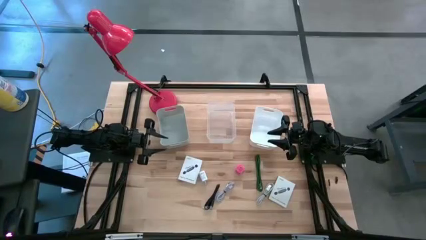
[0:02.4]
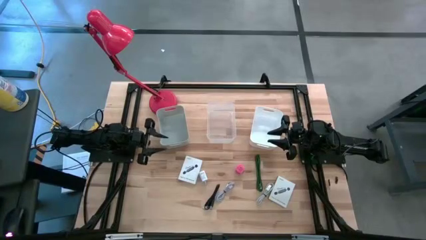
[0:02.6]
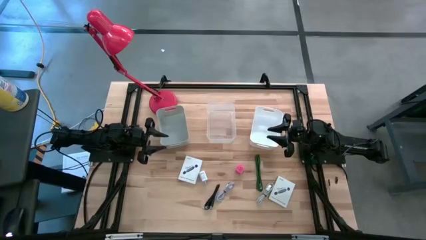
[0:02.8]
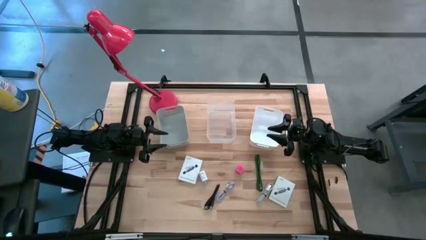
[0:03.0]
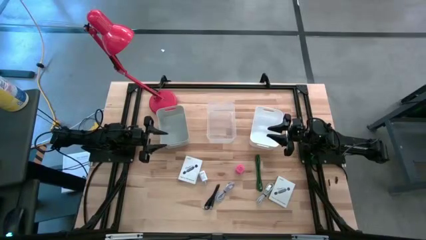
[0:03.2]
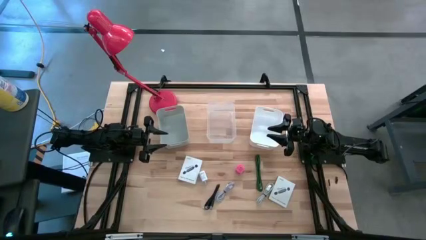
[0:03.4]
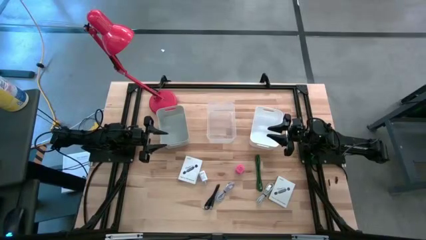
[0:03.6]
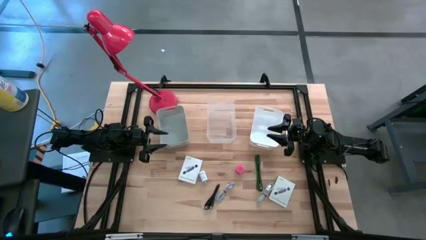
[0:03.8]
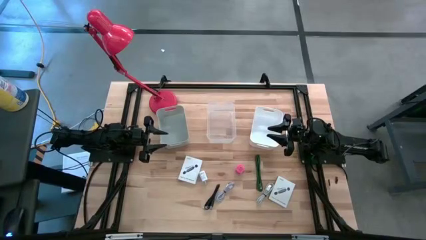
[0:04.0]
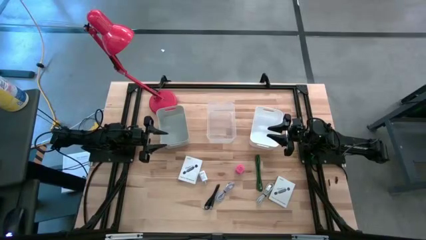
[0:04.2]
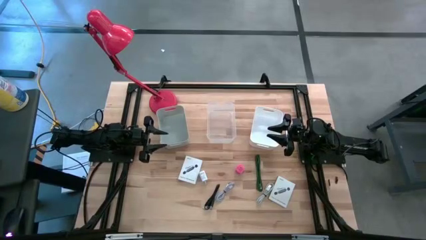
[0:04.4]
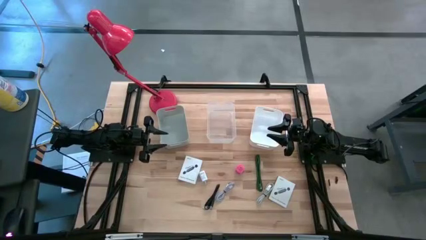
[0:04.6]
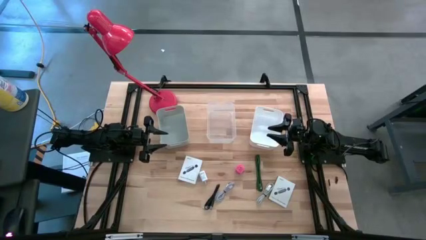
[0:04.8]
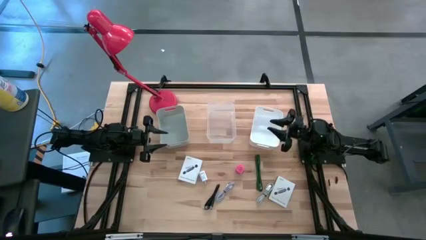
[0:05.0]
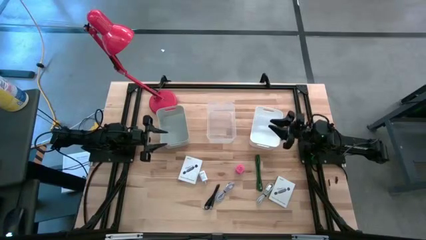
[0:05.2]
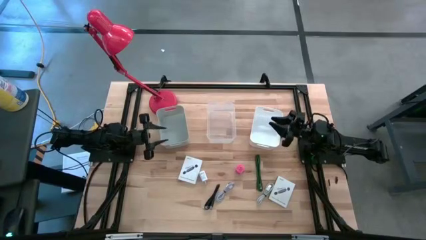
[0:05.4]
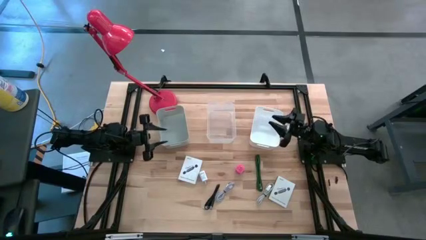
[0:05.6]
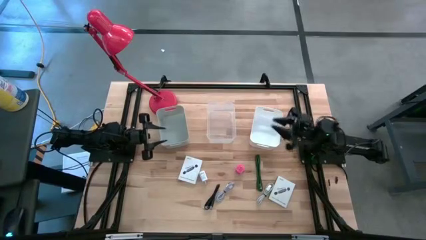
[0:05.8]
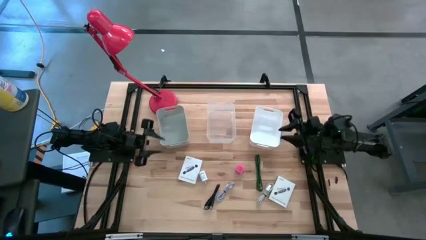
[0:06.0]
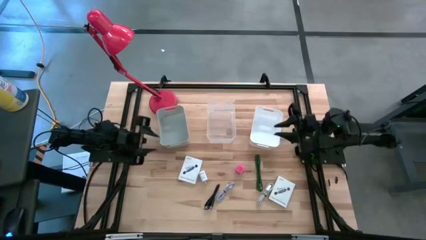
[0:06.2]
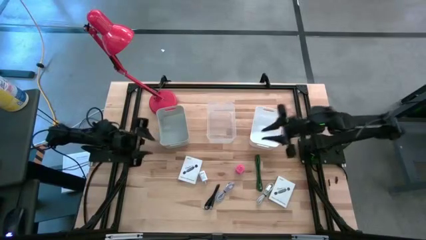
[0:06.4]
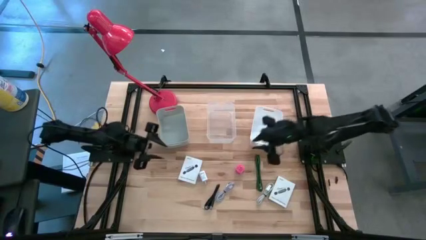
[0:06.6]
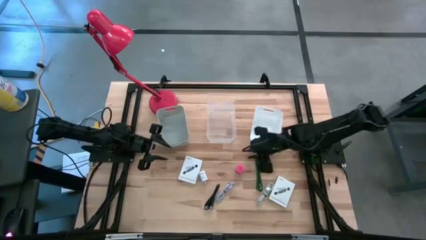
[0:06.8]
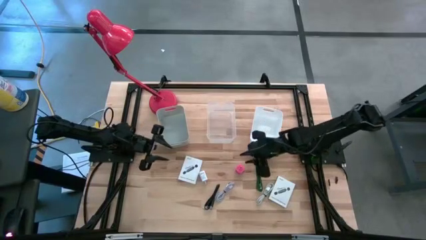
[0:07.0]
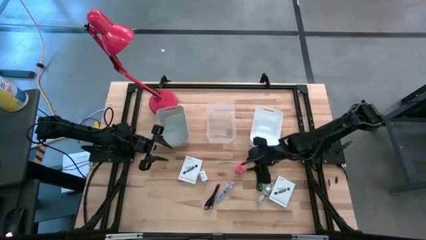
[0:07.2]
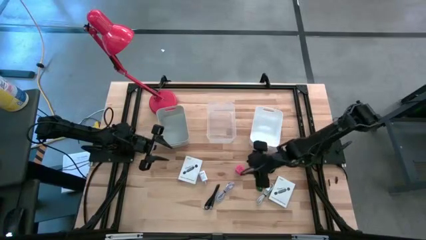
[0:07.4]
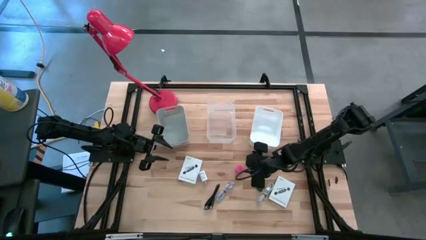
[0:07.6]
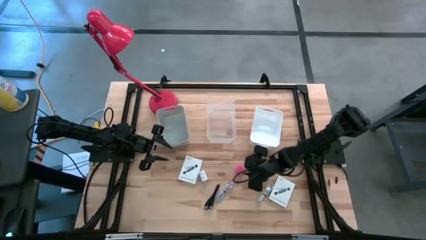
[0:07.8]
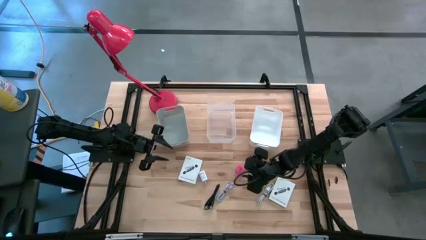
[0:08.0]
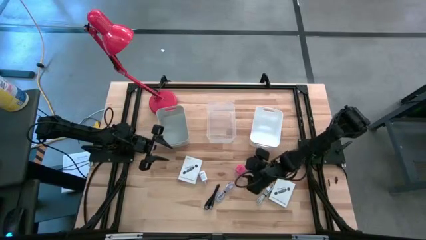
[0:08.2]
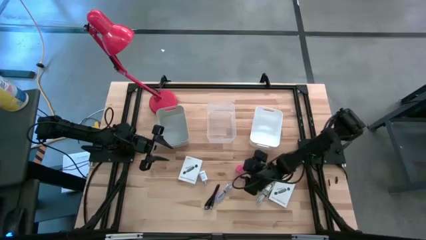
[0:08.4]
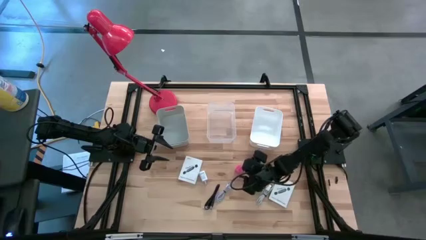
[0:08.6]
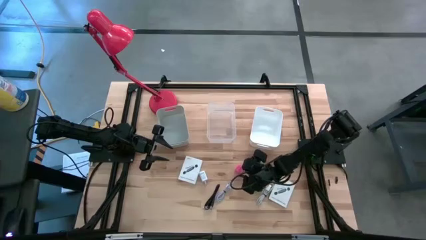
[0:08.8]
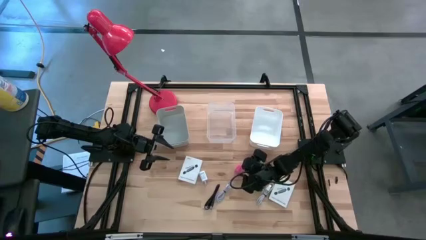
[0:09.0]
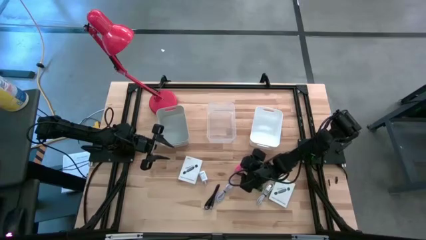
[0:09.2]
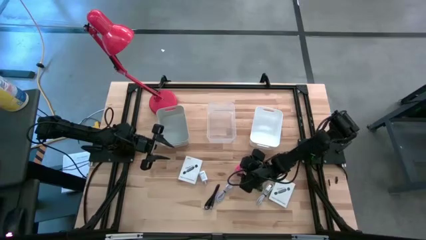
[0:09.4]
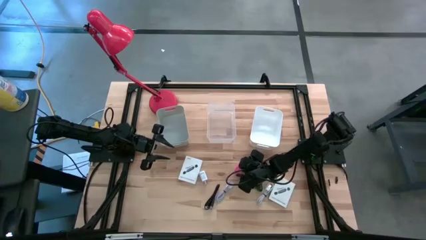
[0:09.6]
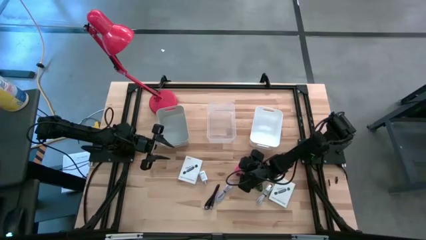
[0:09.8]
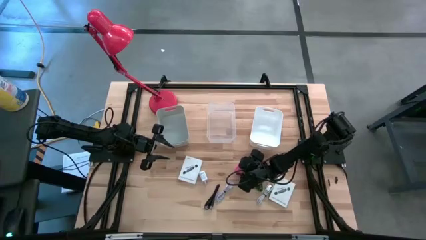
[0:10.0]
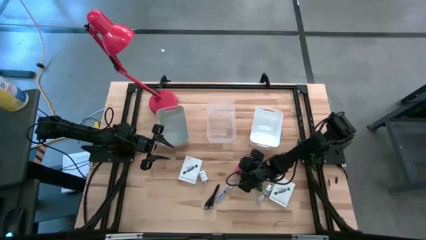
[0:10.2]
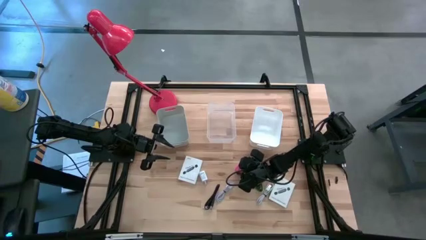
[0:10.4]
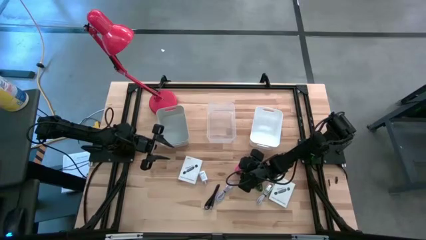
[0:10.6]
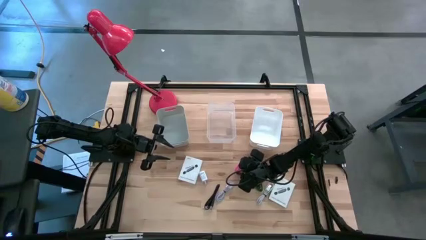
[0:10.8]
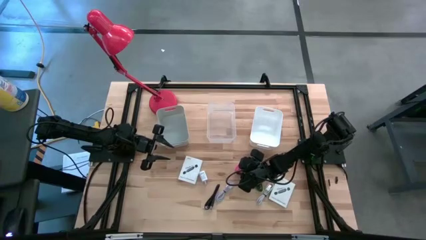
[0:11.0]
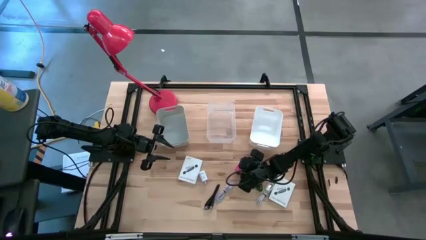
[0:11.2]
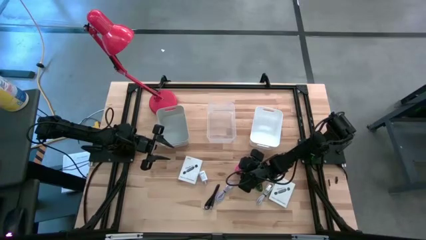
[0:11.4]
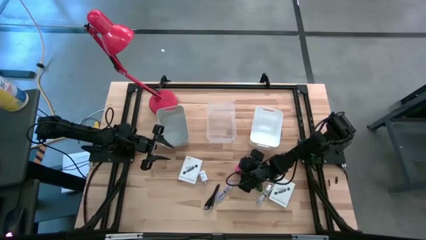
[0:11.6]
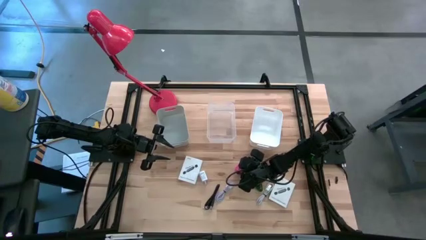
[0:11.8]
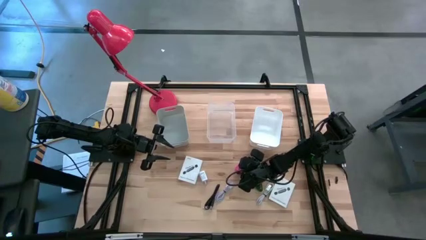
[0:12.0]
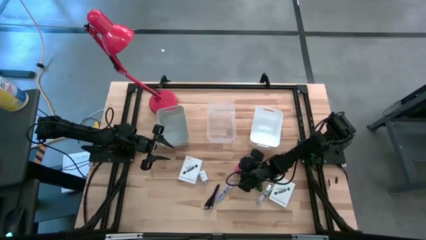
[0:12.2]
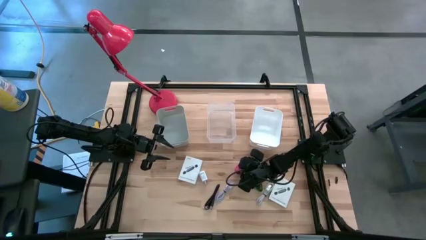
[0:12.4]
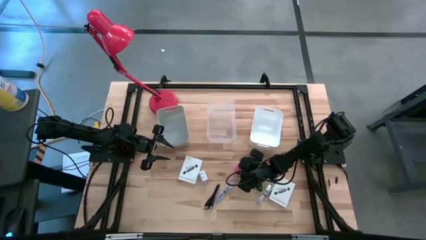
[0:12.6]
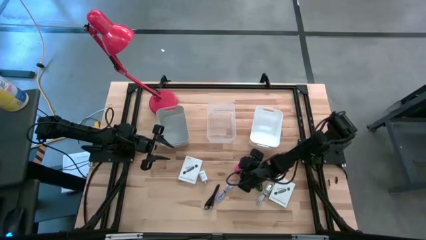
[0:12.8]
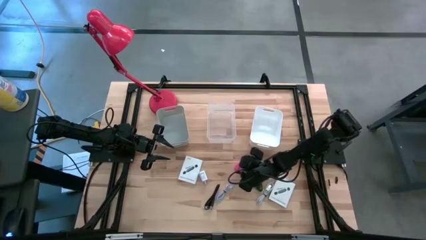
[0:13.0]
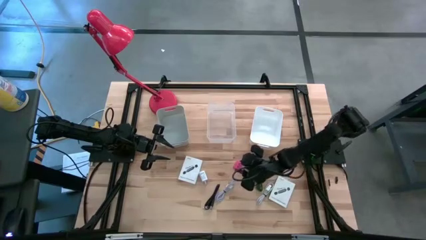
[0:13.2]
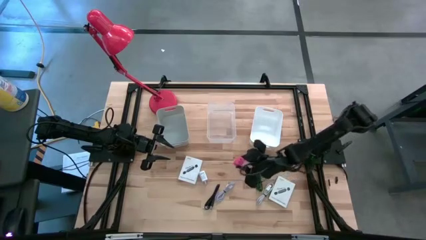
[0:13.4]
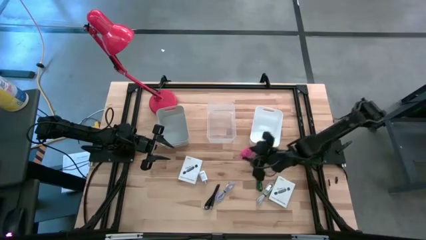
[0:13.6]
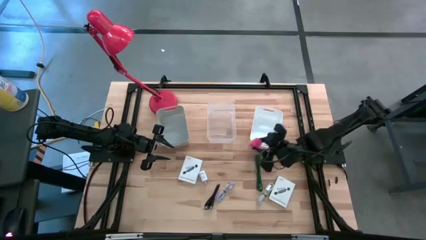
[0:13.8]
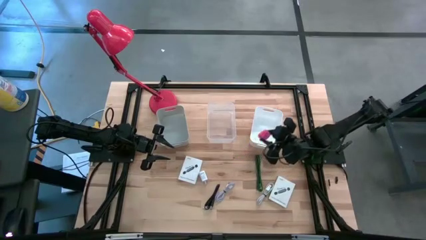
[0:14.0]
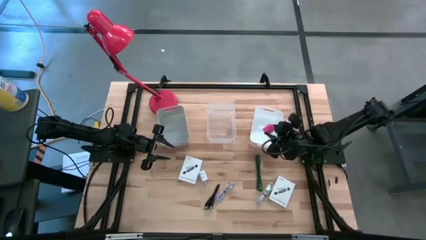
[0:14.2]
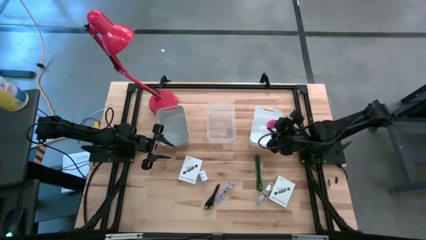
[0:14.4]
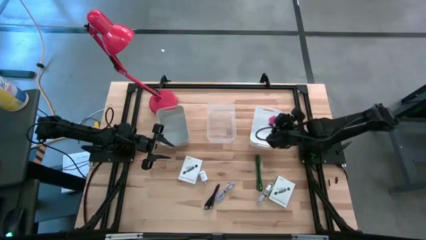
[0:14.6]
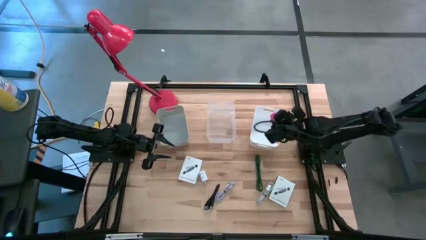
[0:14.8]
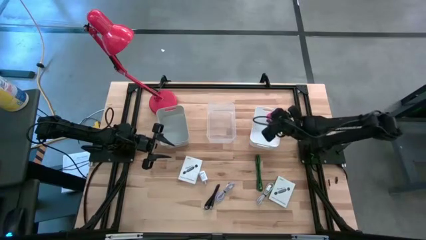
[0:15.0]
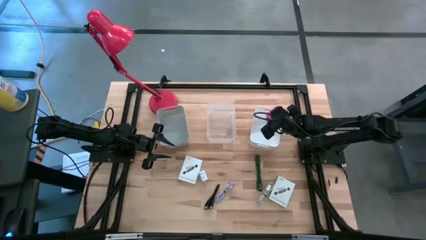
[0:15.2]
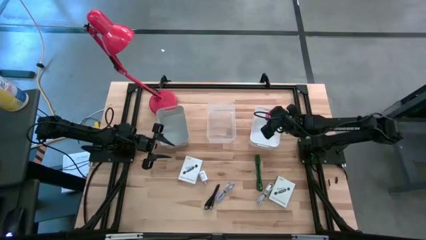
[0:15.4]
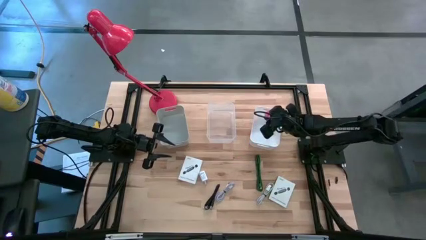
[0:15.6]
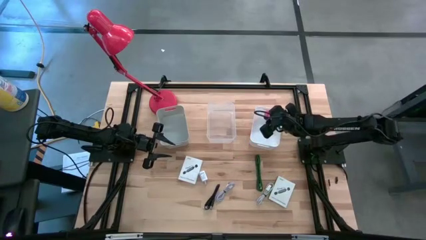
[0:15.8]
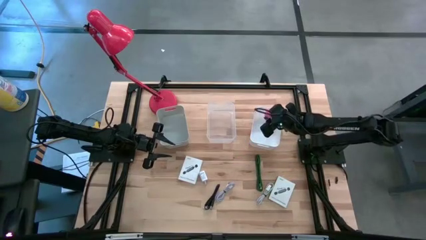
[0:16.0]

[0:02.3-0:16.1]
Task: Pick and place items into bin
Put the pink charger adapter into the white bin

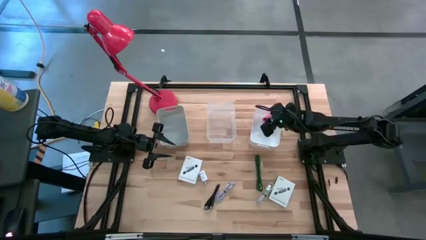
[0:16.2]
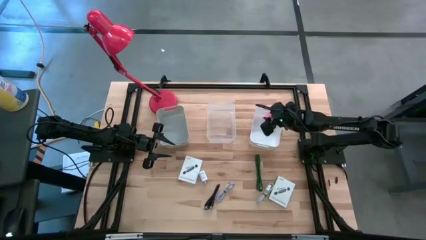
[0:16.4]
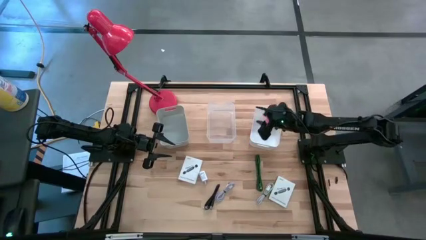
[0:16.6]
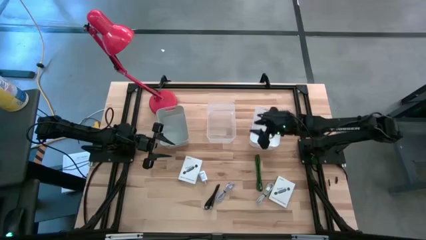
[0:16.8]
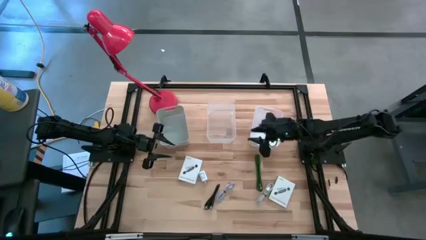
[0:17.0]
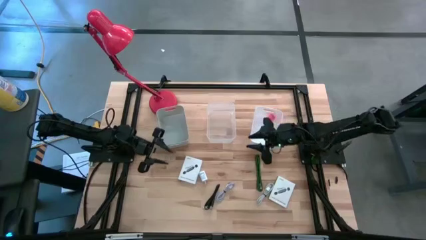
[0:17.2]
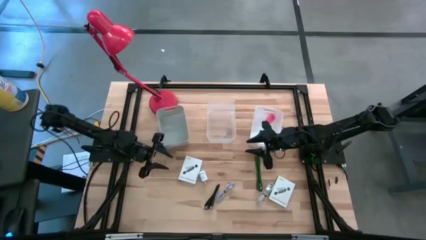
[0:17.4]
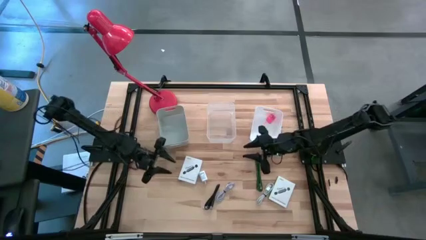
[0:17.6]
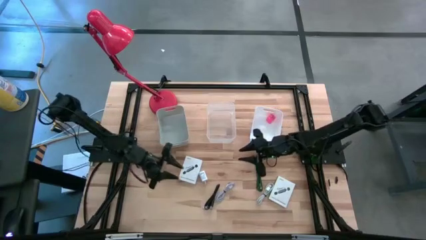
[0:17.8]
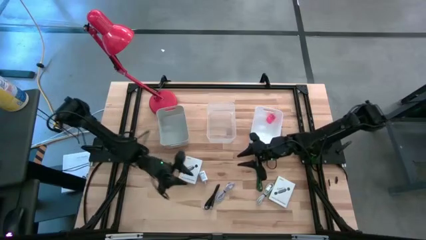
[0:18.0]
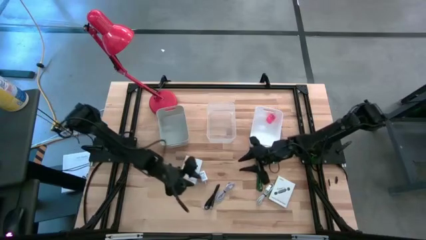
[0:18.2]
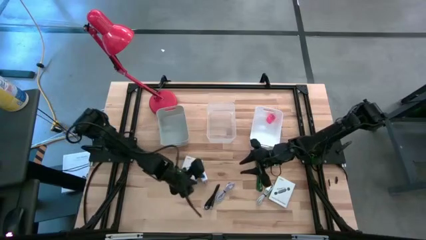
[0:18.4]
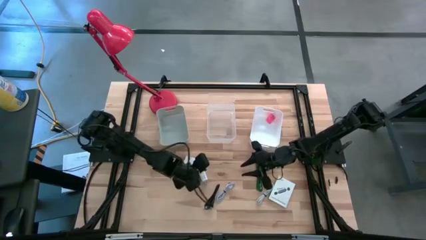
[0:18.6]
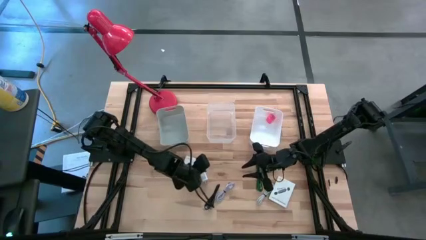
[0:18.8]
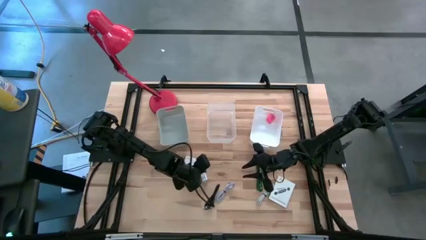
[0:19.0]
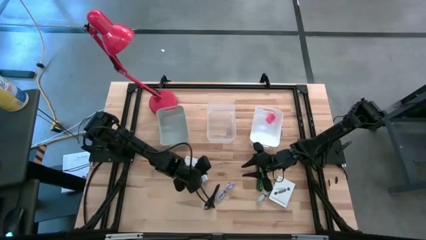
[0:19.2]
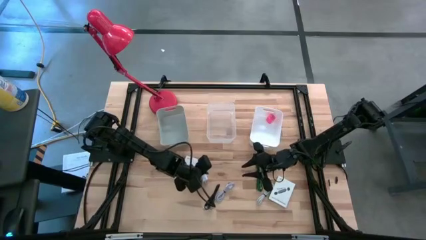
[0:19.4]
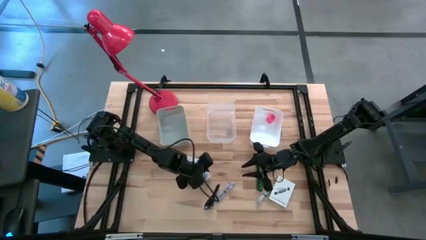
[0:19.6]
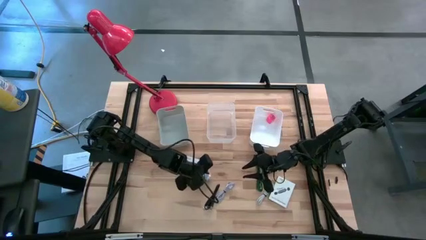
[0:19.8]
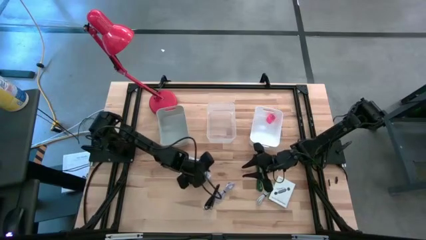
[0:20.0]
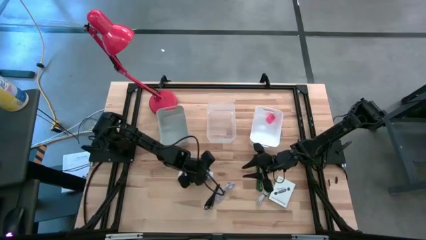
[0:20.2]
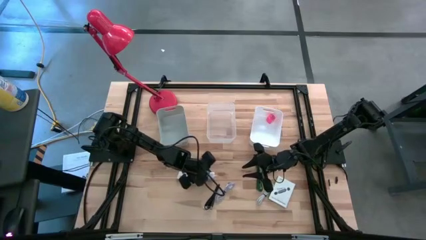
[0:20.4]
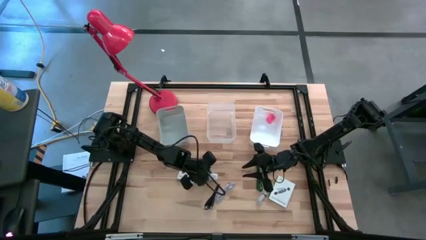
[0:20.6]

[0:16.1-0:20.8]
Put the white charger adapter into the white bin
